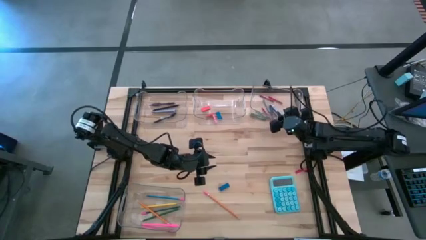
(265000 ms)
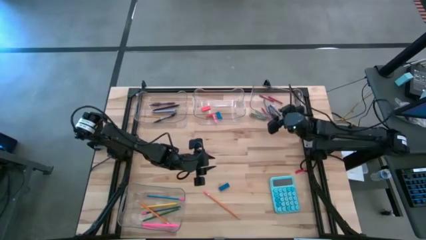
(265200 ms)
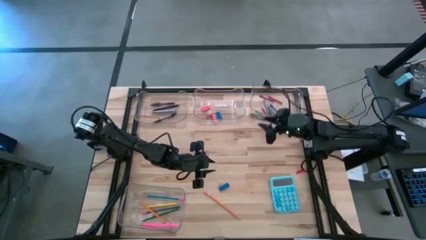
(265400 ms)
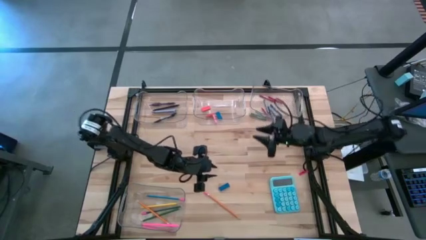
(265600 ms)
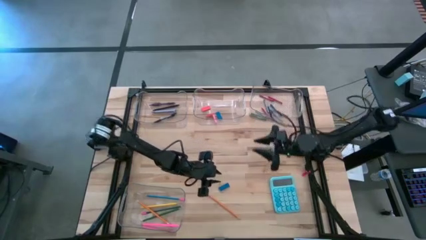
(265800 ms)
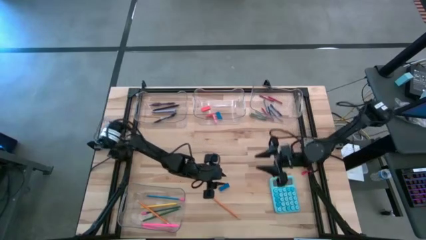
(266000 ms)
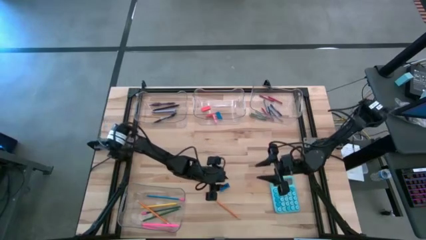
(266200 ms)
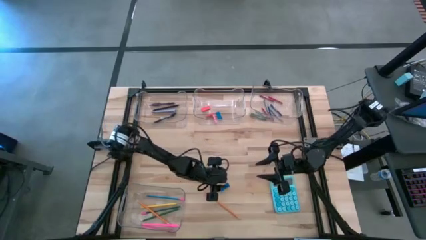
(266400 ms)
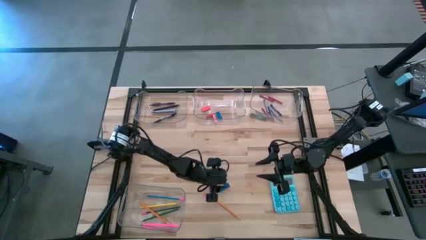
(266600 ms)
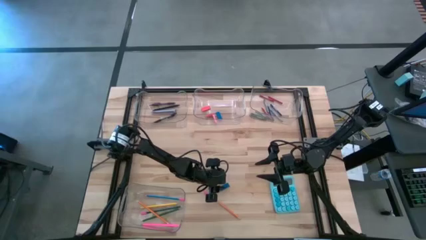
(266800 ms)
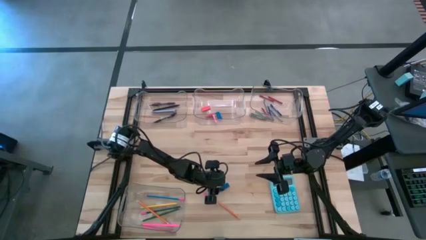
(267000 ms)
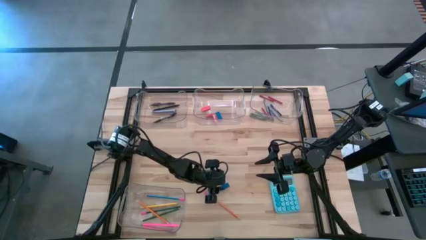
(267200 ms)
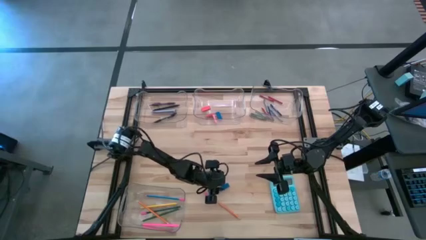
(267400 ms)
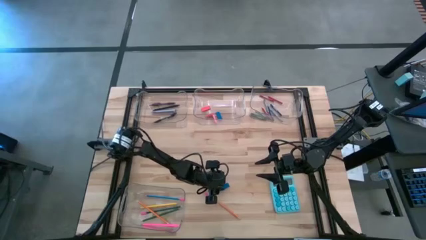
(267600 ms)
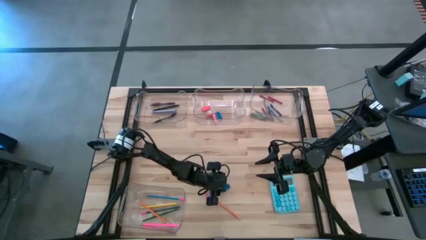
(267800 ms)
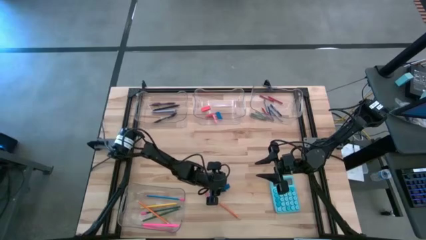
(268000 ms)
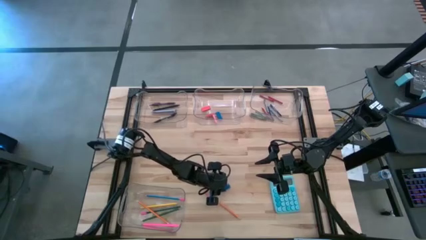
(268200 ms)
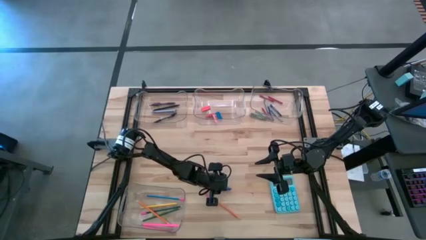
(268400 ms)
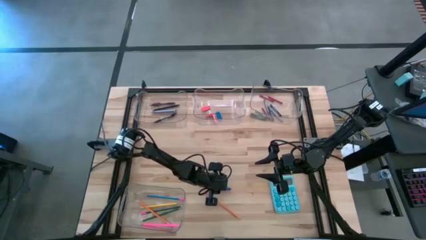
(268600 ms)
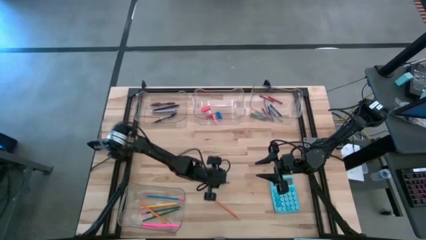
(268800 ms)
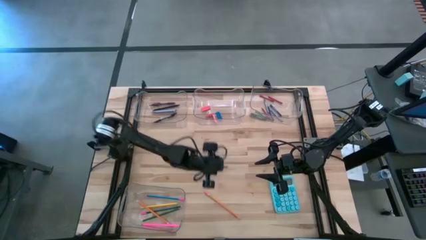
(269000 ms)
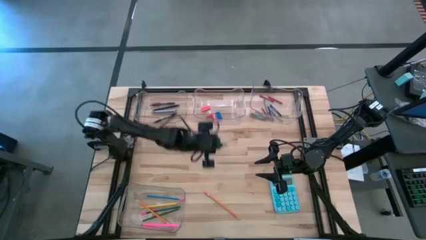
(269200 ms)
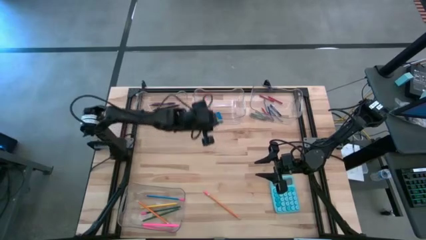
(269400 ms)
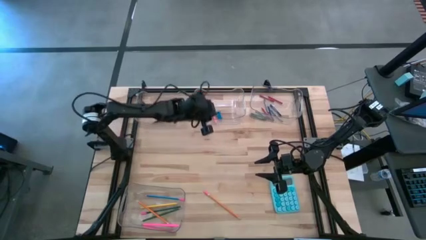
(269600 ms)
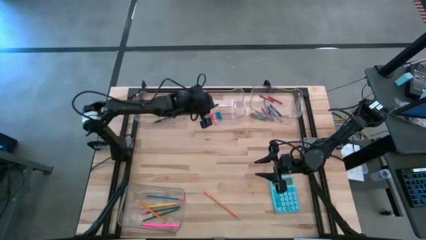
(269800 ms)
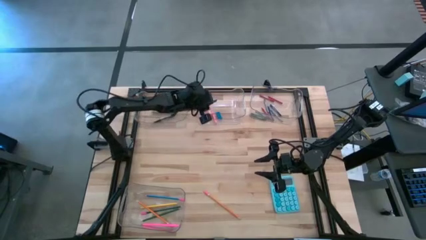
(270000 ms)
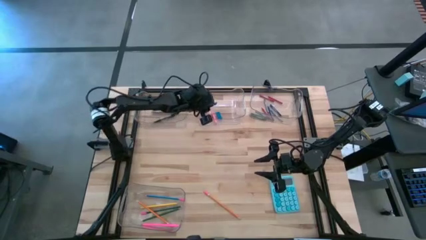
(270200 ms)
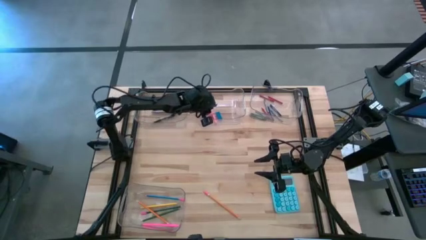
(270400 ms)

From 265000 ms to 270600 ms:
Task: Sort crayons/erasers/pens/pencils in bins
Put the blue eraser into the top middle transparent bin

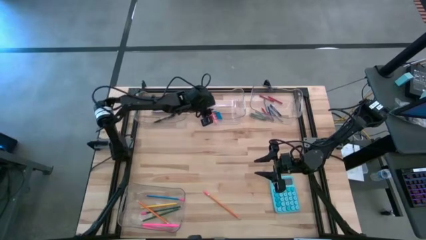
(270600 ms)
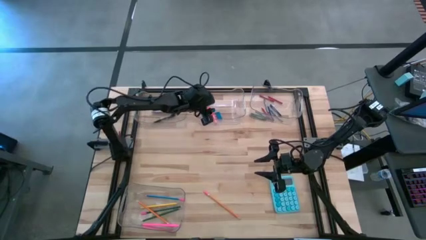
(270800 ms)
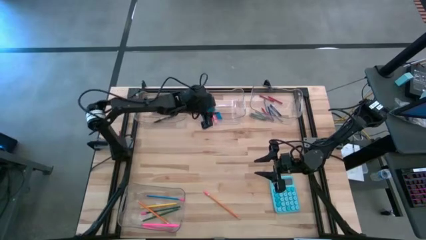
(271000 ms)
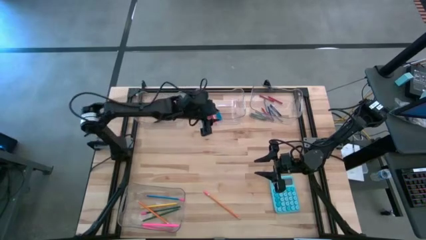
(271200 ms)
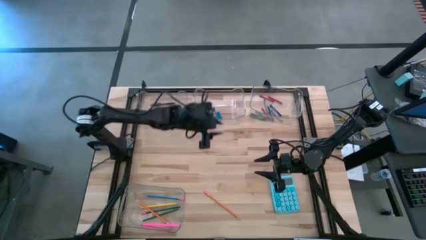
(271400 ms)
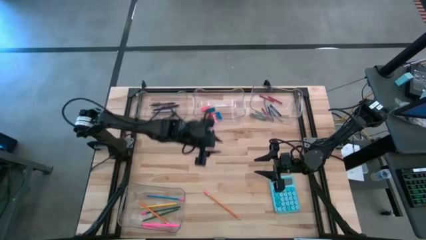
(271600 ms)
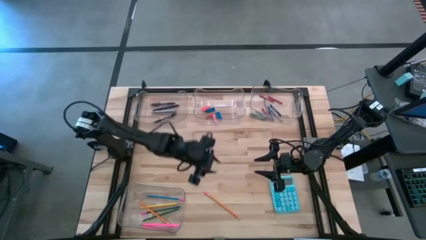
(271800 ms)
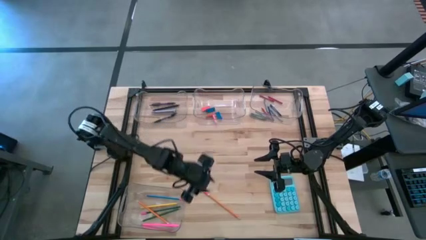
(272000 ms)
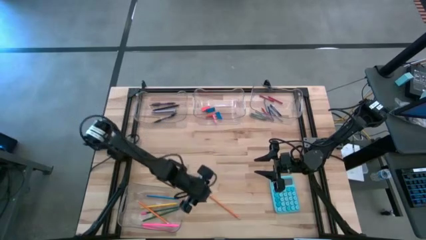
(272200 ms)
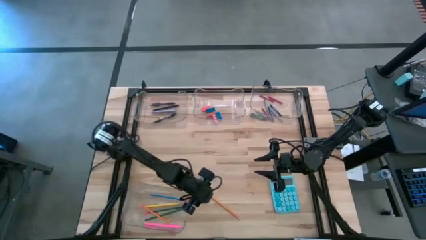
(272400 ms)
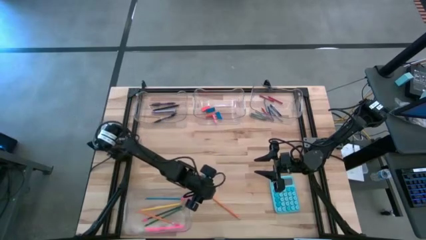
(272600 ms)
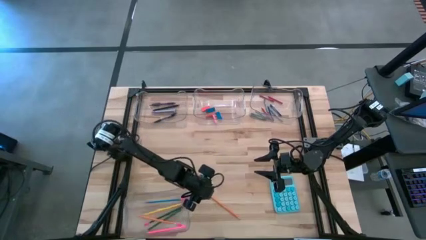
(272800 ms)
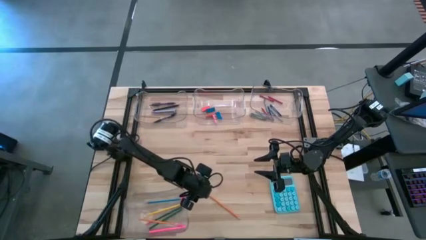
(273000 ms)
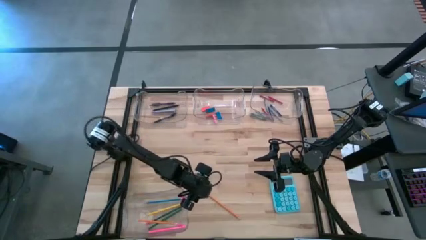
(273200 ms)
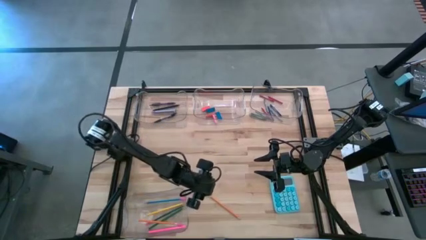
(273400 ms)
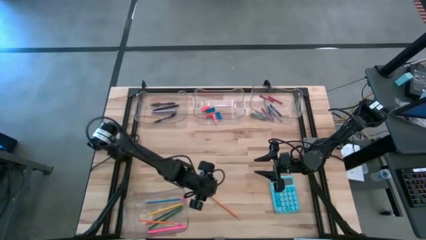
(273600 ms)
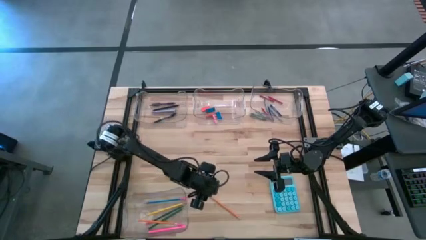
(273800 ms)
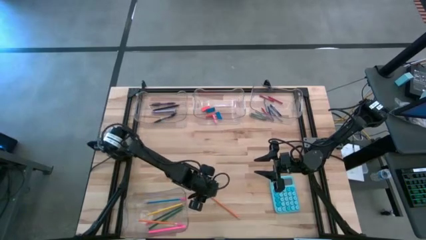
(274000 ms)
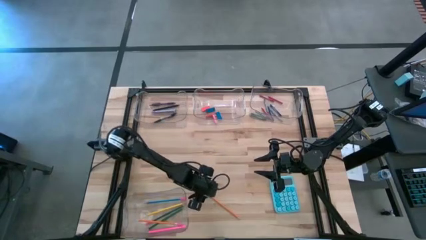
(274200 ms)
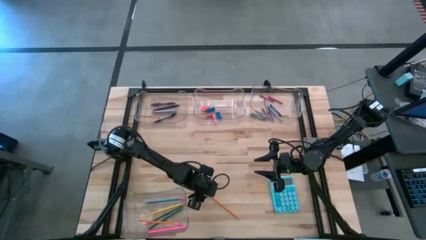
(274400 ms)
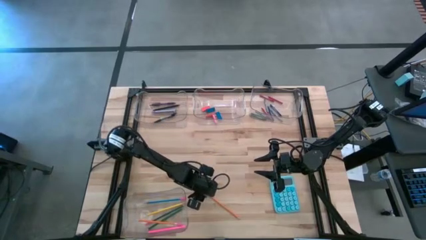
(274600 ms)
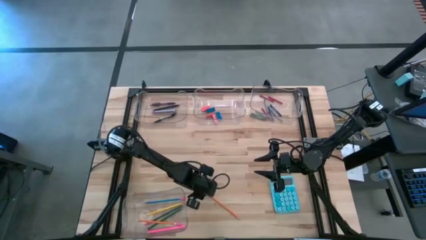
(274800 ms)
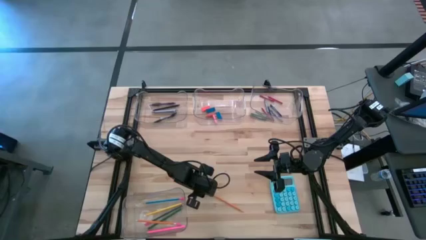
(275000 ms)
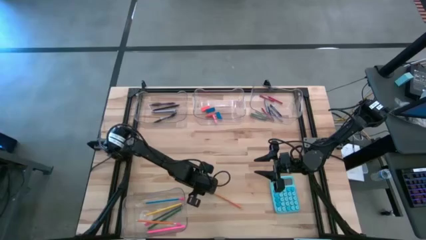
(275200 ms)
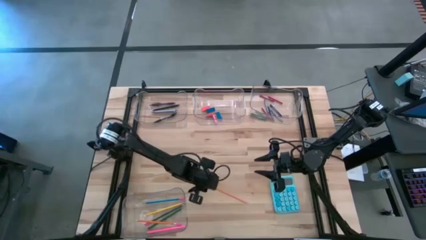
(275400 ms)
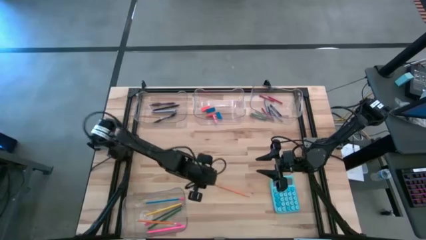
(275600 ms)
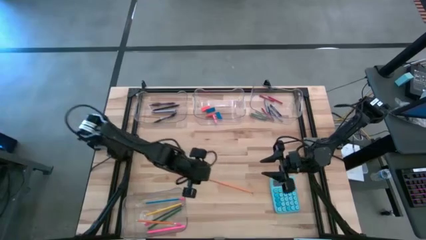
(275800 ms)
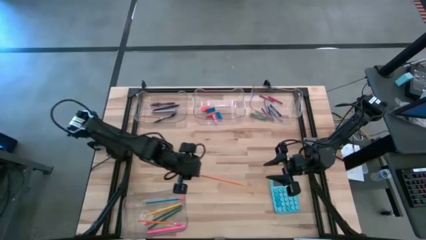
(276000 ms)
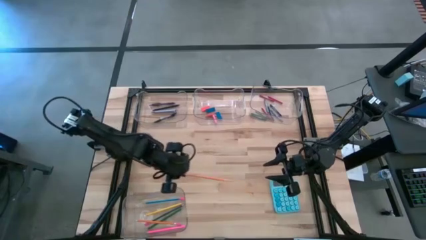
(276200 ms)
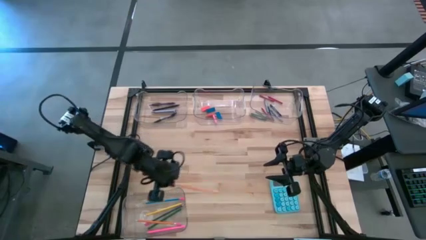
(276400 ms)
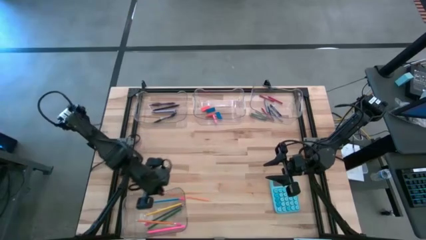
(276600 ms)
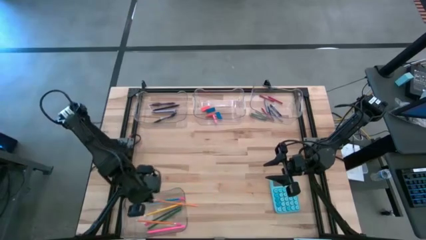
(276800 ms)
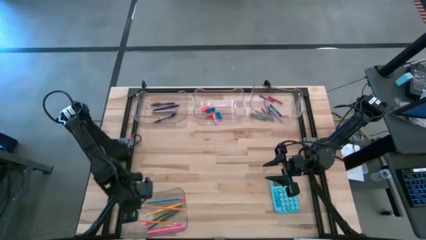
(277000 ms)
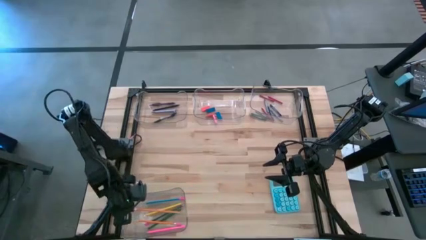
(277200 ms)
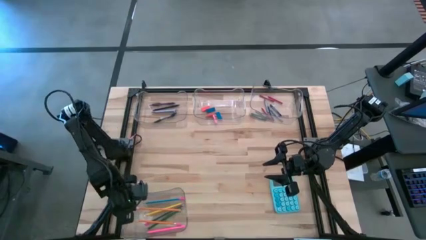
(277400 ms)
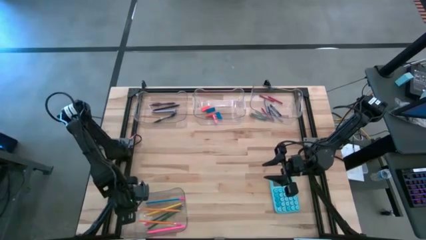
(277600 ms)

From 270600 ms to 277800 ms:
Put the orange pencil into the bottom transparent bin

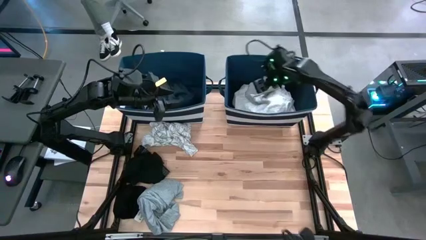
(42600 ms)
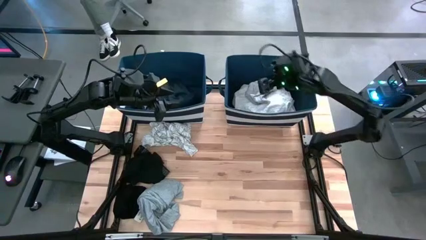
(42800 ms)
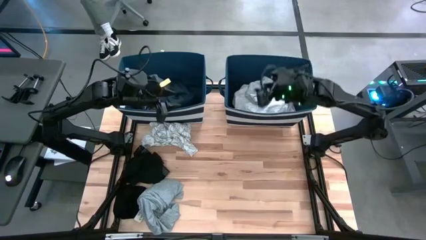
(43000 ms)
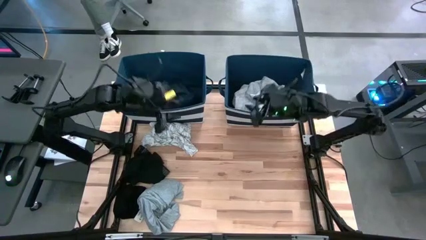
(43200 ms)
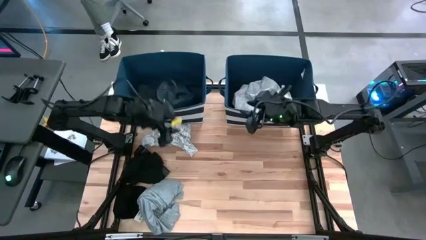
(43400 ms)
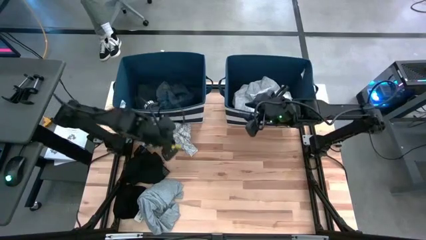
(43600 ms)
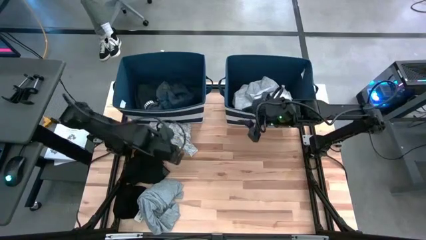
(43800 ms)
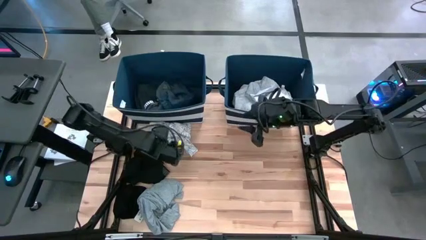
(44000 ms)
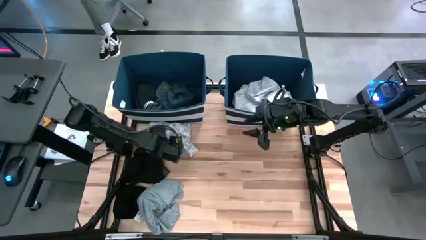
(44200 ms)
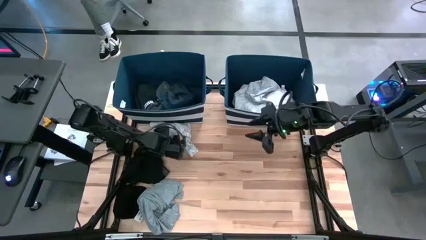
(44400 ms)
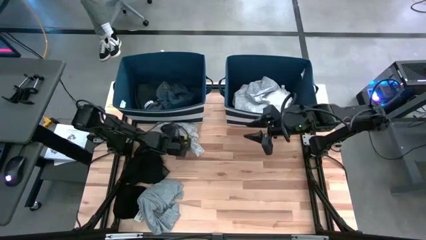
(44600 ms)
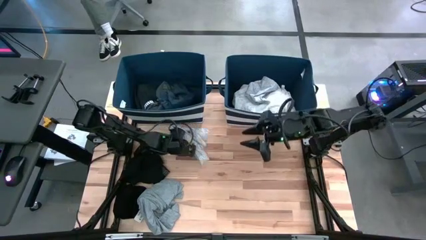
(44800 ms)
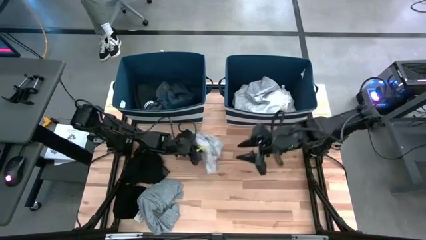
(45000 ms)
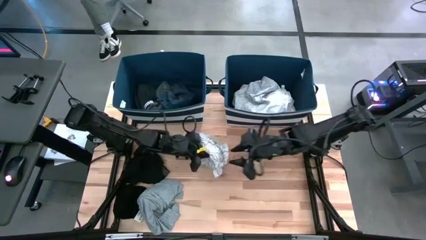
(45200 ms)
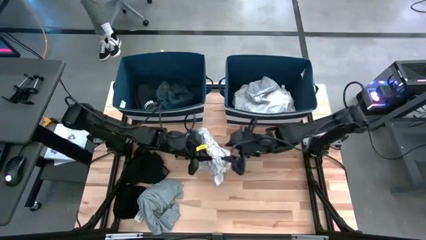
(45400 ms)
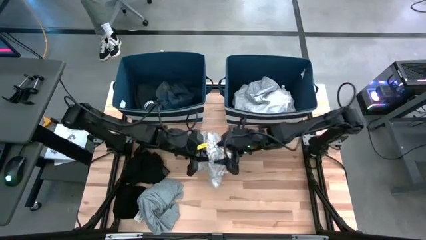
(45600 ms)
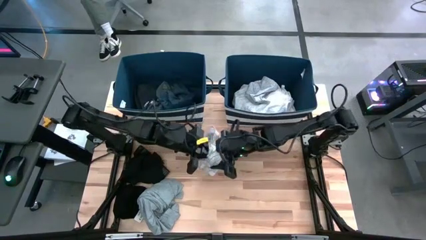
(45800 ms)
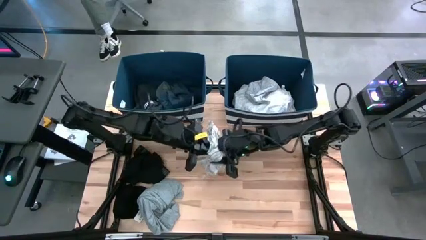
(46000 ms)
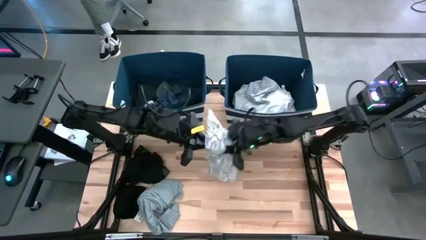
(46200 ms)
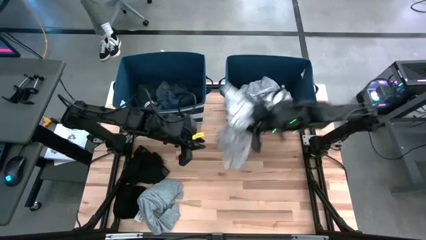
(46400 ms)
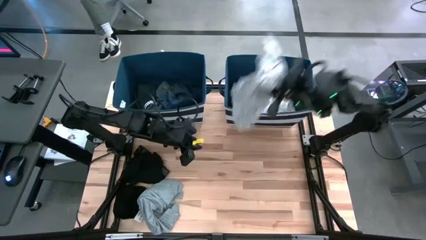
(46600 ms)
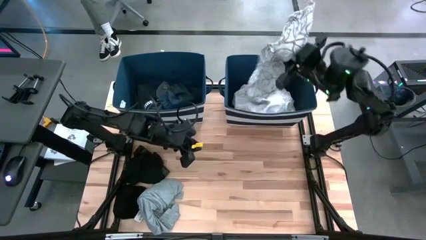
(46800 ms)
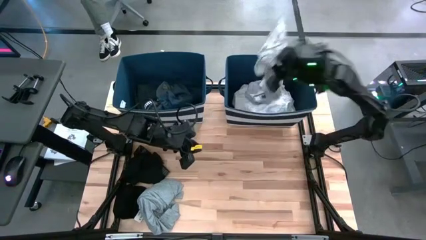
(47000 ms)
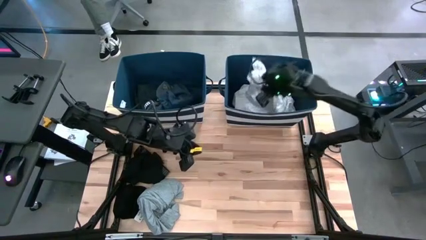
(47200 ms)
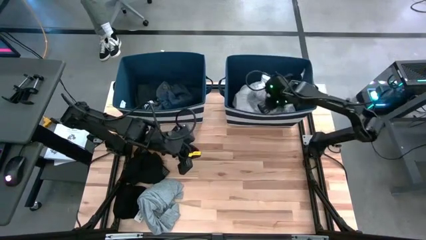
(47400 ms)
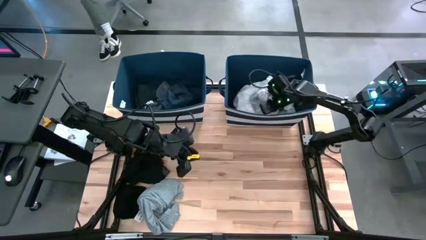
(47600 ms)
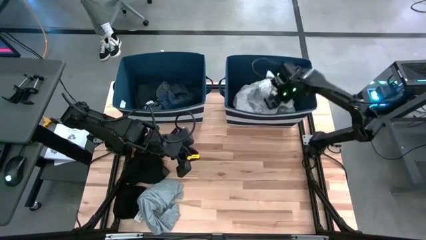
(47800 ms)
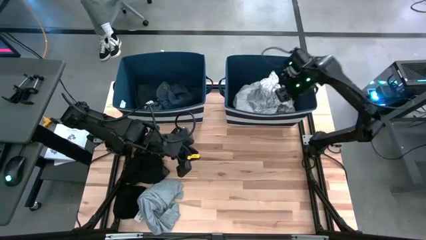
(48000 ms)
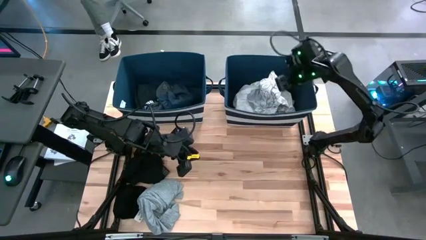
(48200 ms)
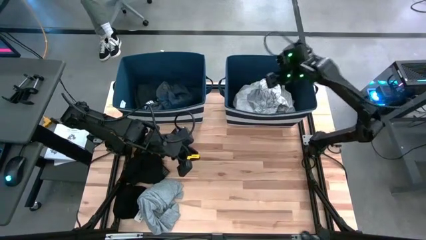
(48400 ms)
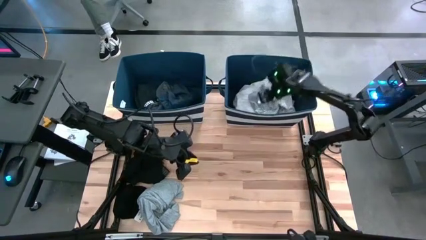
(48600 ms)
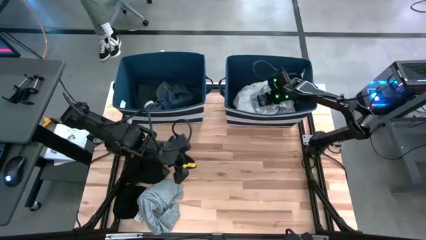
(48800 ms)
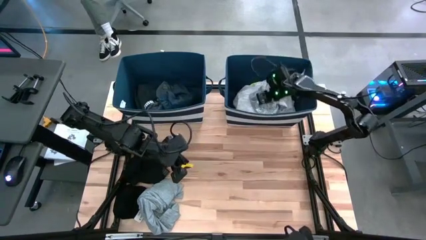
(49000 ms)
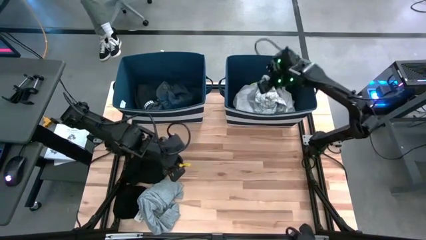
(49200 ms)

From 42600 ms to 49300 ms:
Task: Sort clothes
Put the white shirt into the right blue laundry bin
